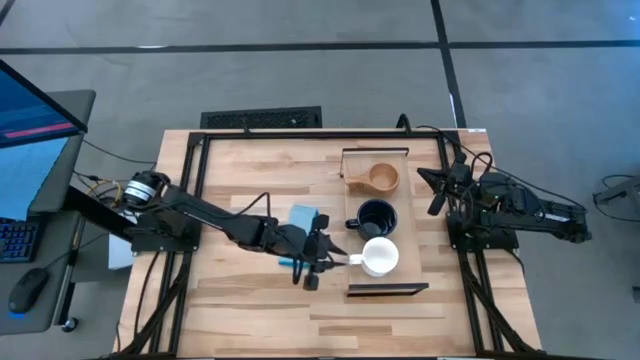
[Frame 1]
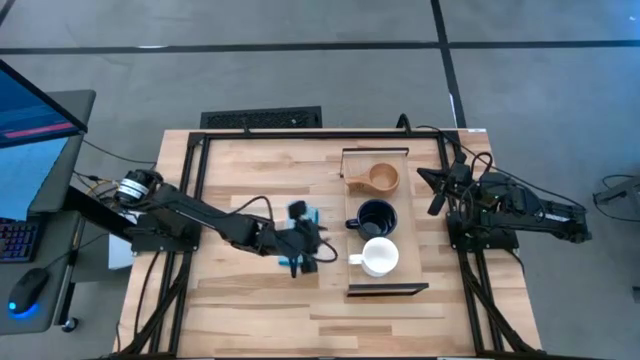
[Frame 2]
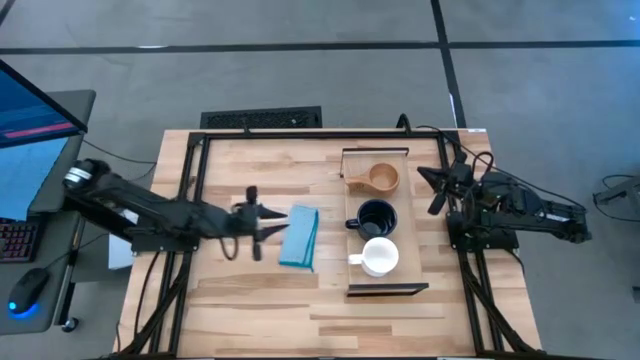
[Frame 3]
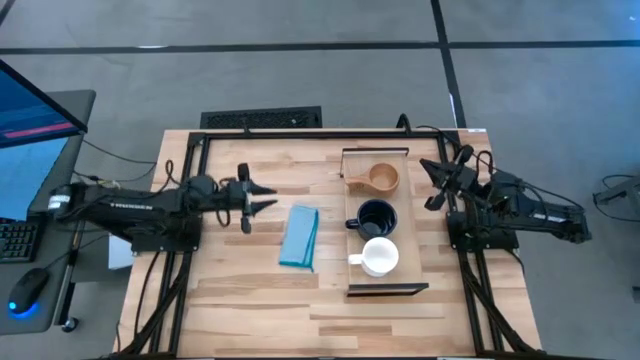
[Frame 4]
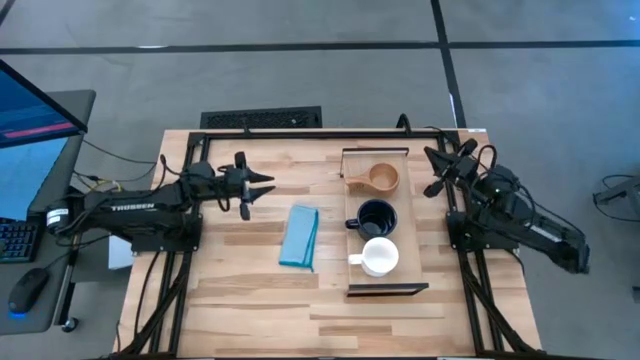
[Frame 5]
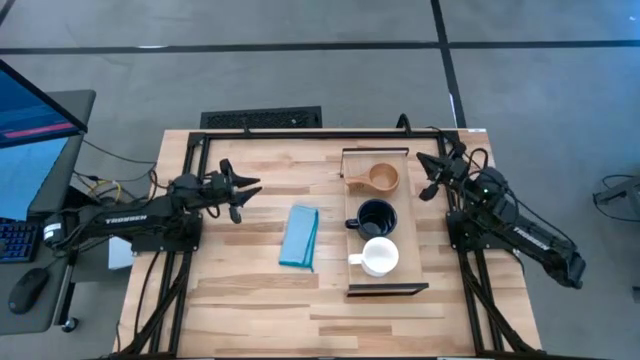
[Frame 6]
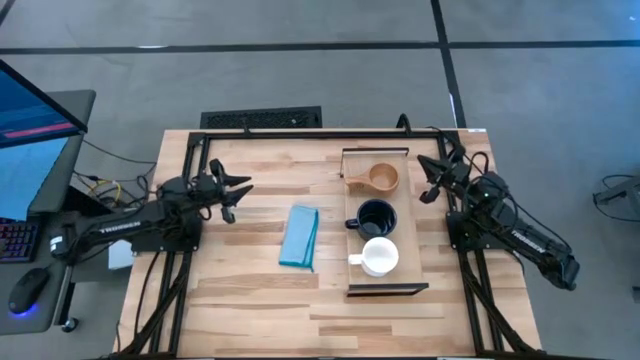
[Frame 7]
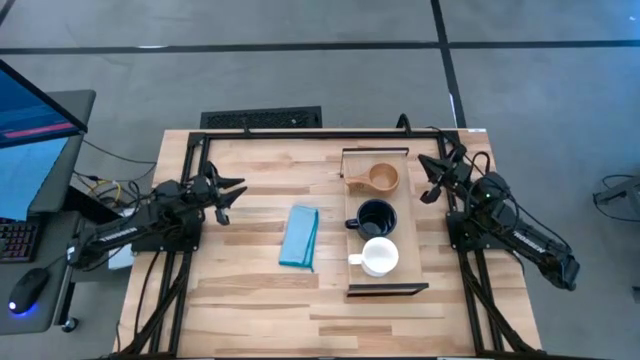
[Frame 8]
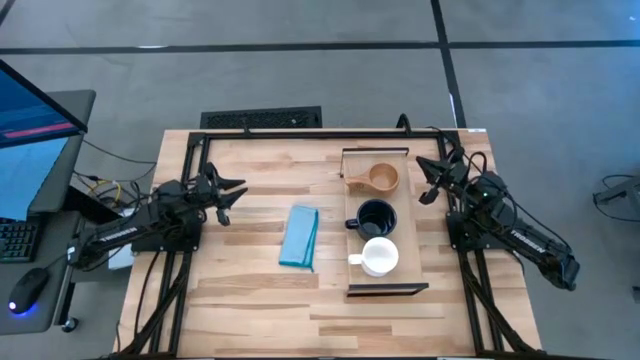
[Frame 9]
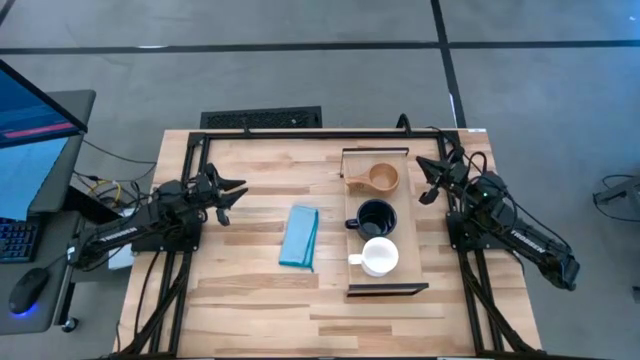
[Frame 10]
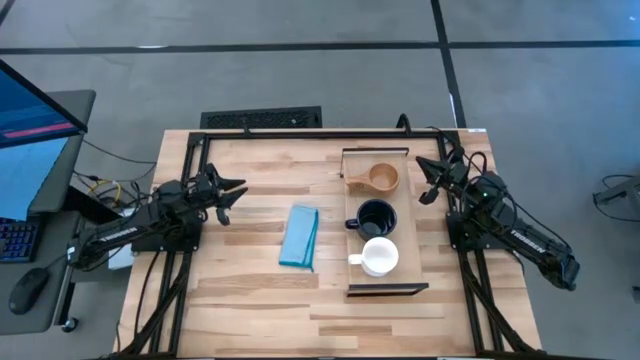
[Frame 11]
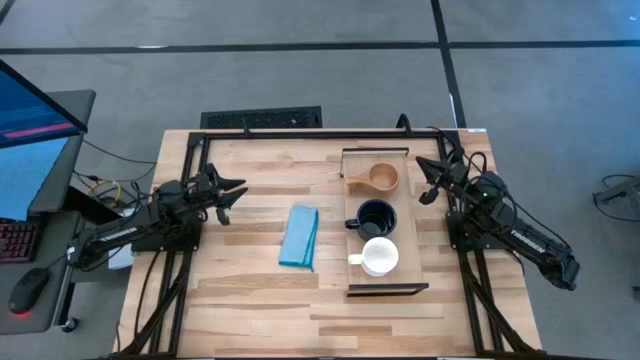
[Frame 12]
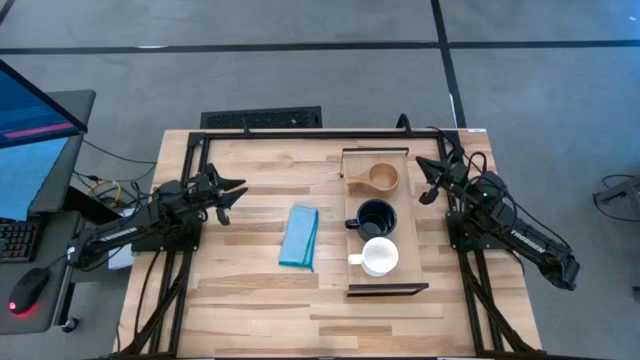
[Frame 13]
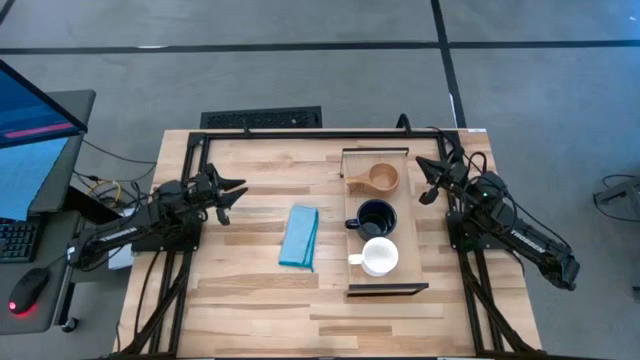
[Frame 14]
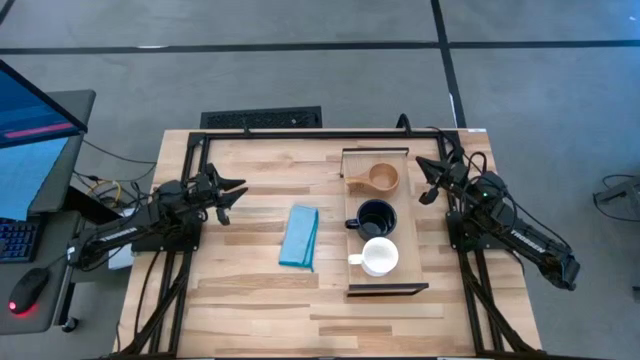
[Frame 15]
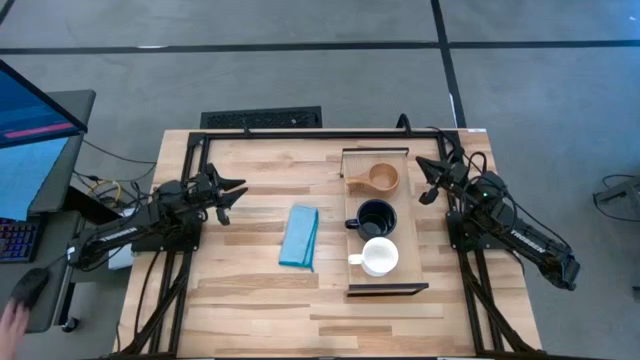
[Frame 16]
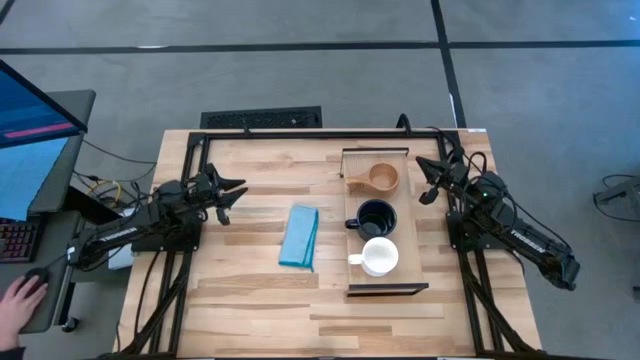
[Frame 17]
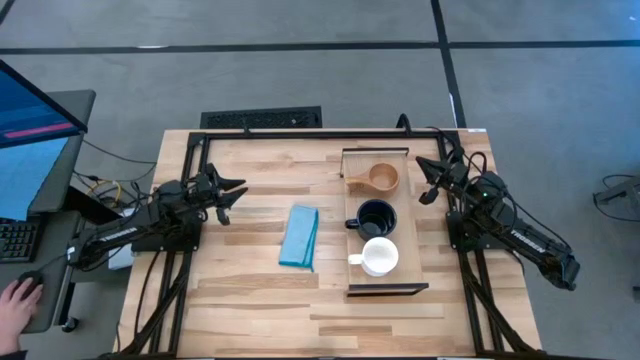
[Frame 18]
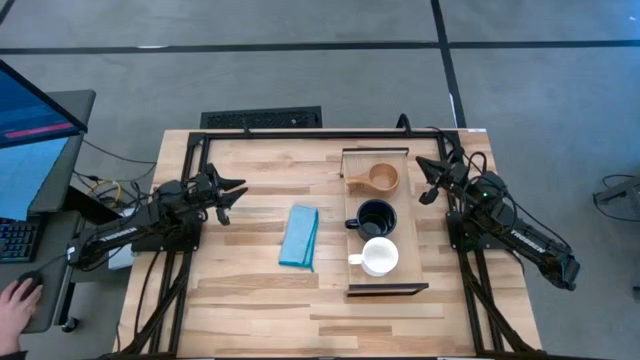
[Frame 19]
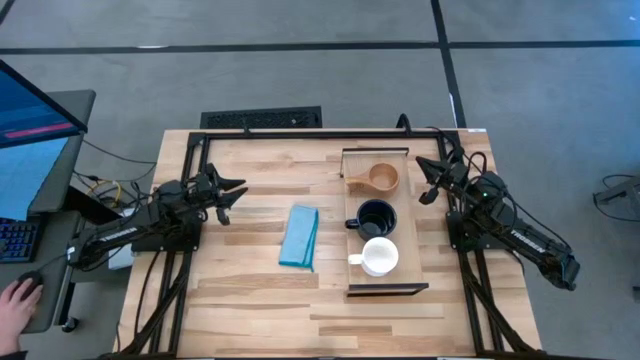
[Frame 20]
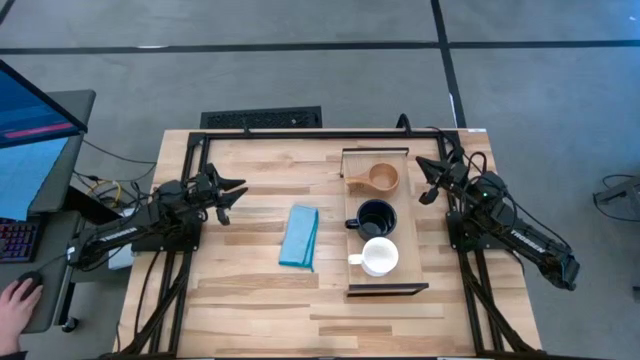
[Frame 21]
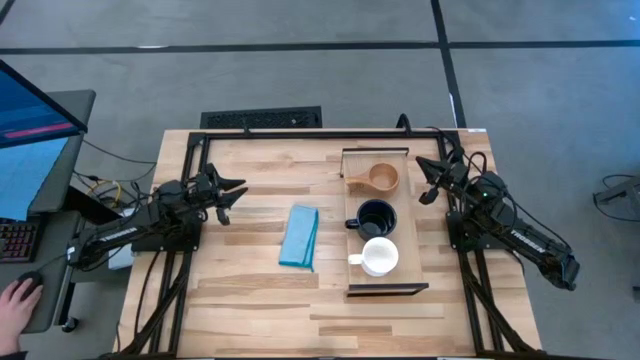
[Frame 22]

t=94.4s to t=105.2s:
Task: Stack small to large cups/mugs on shelf
Return to Home Position

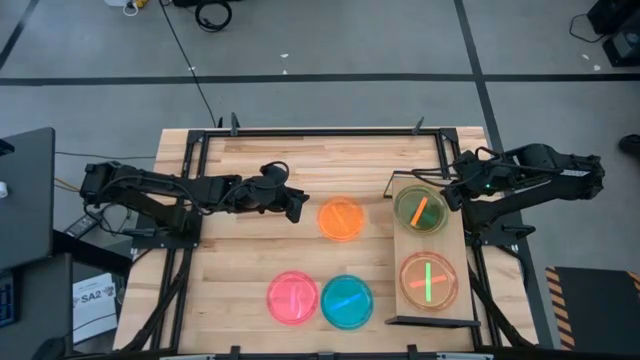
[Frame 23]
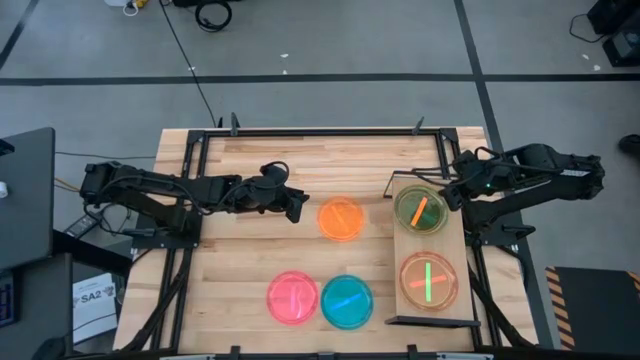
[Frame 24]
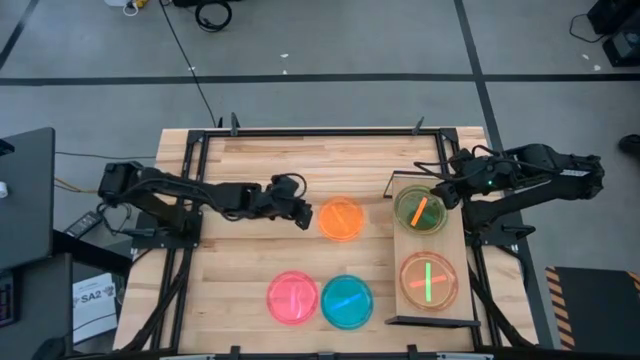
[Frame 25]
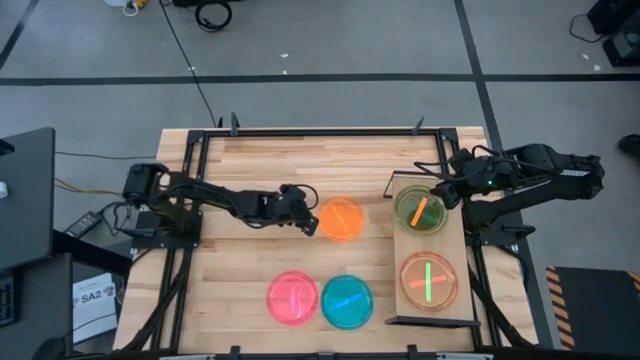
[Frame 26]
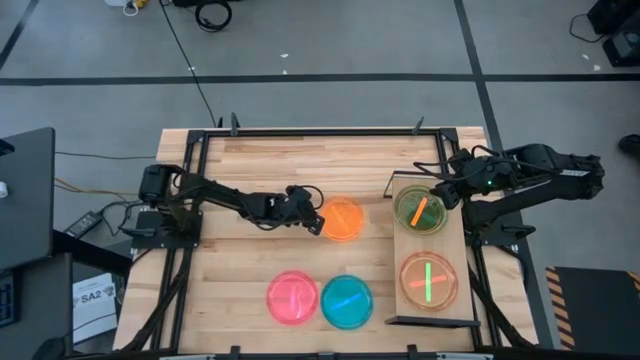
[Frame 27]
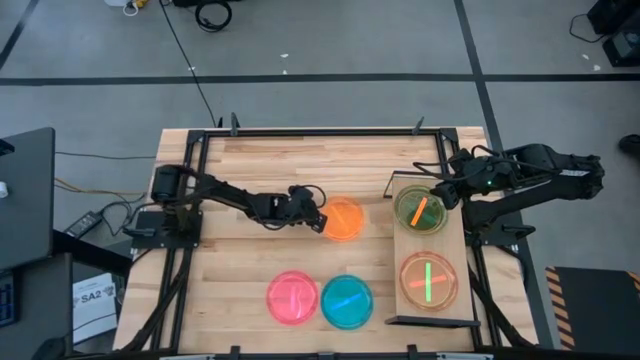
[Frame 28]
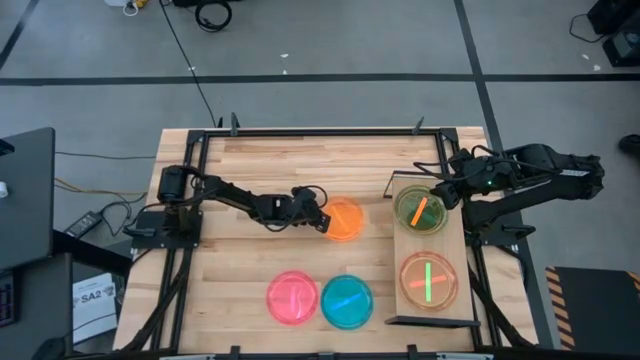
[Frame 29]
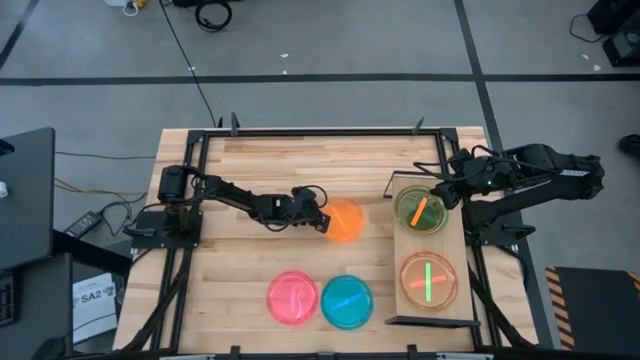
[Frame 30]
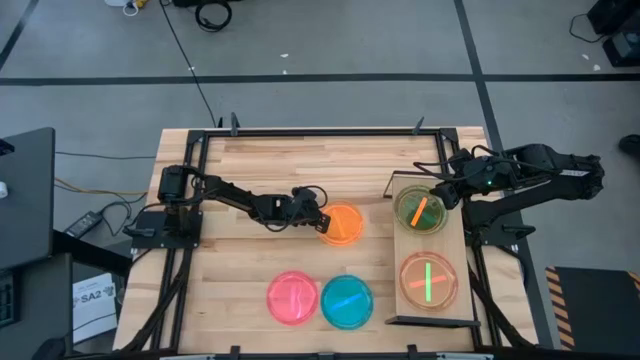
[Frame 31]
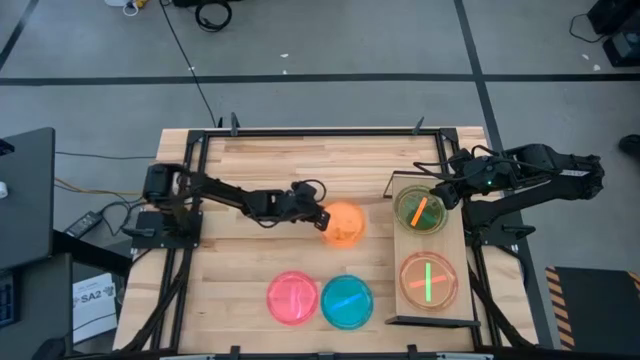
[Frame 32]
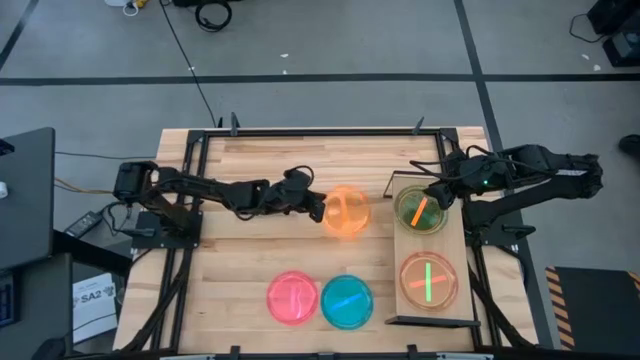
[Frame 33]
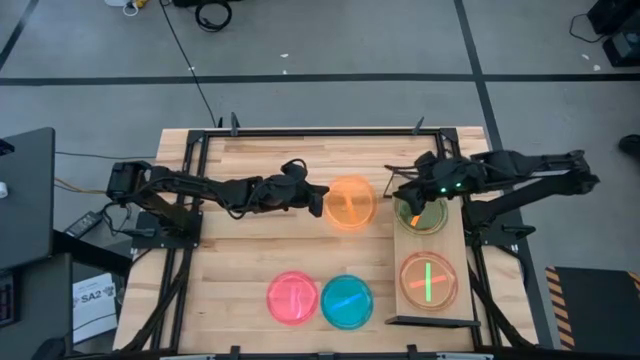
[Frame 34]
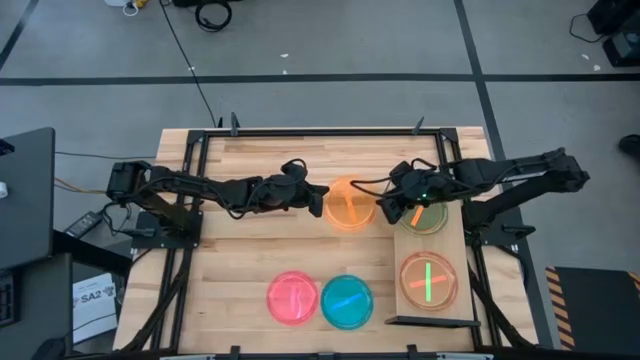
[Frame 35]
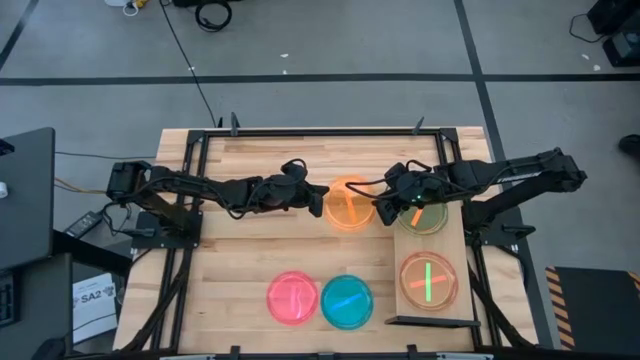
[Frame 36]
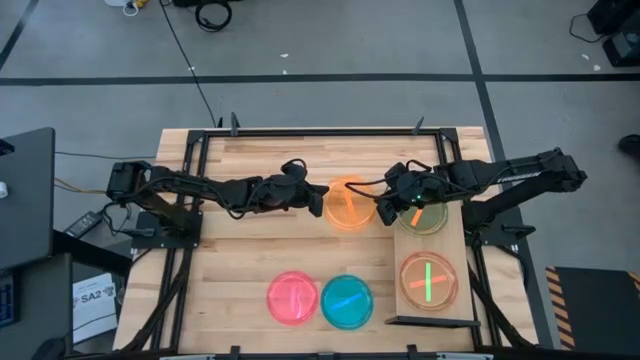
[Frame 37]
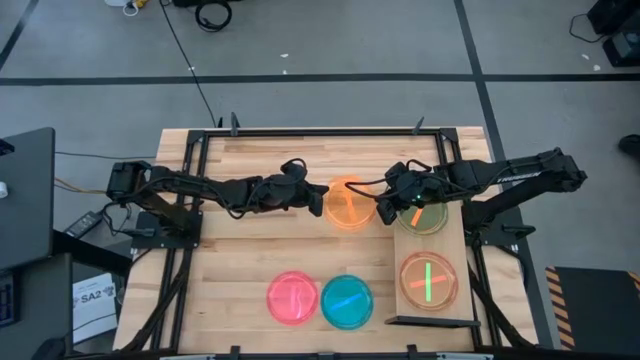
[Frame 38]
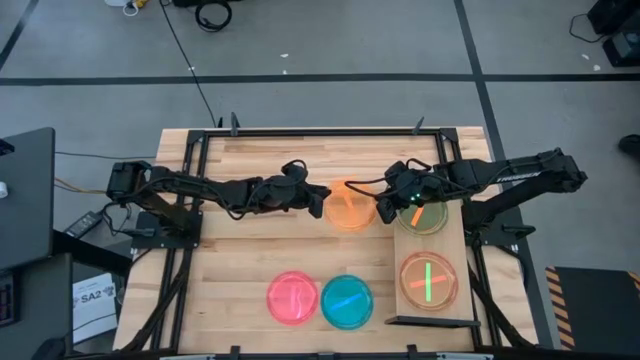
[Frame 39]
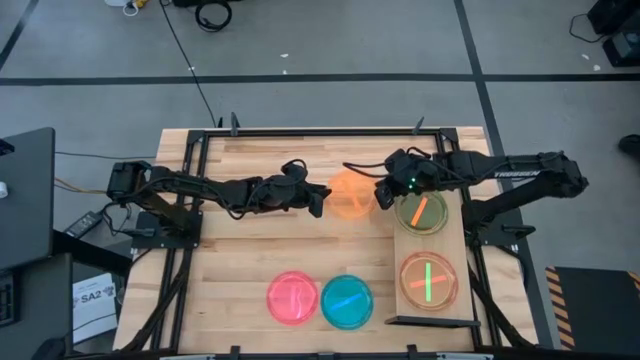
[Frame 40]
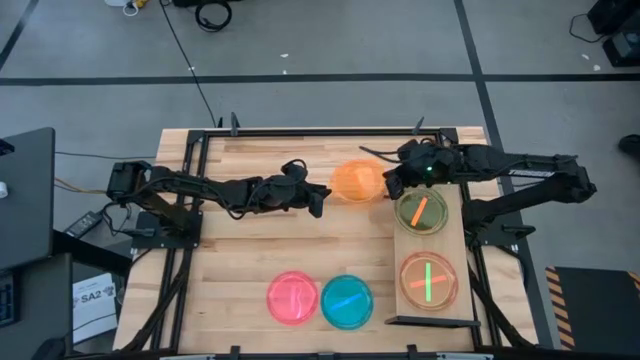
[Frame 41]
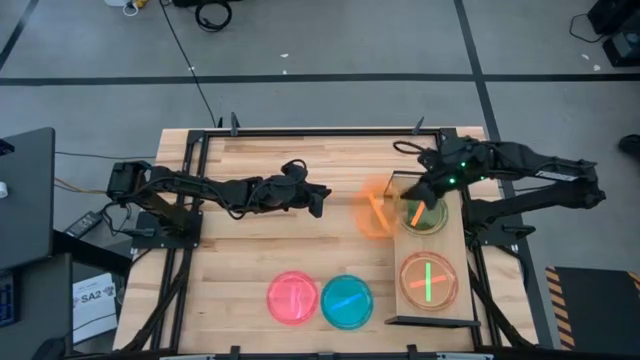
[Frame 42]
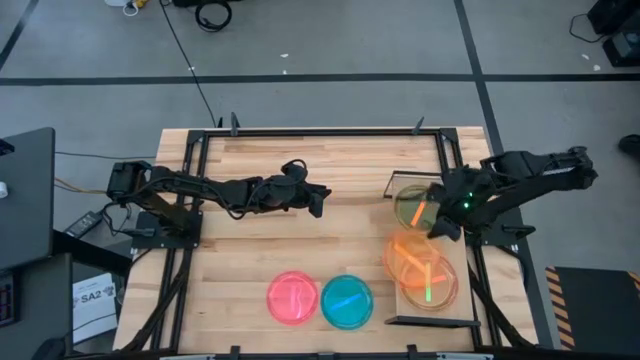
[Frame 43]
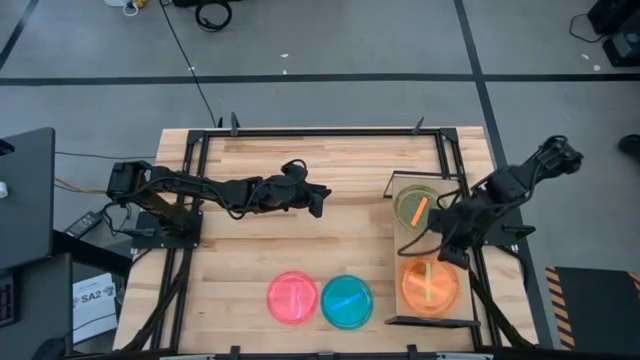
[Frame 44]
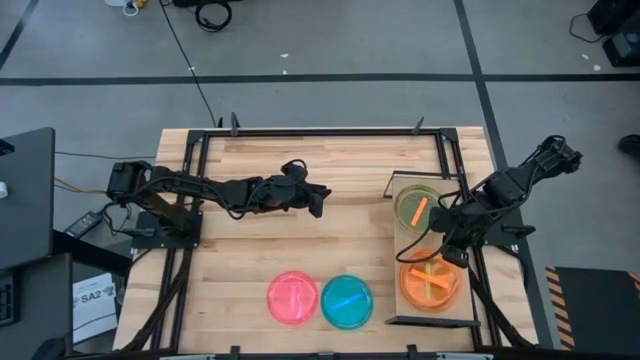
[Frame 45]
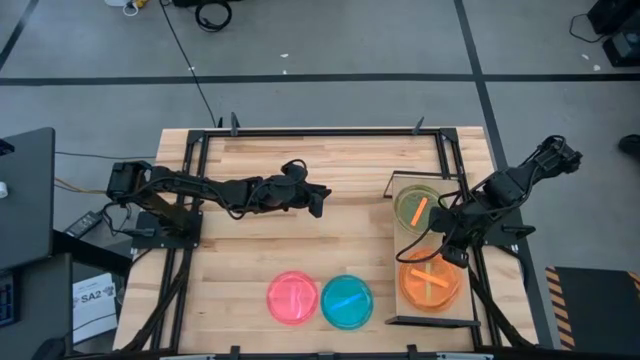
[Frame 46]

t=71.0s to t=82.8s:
Task: Place and stack plates onto a shelf
Stack the orange transparent plate on top of the green transparent plate on the shelf
